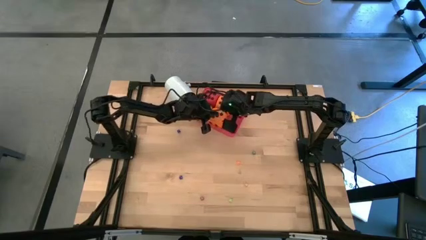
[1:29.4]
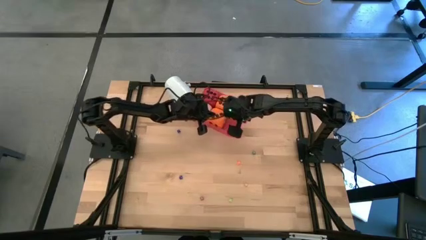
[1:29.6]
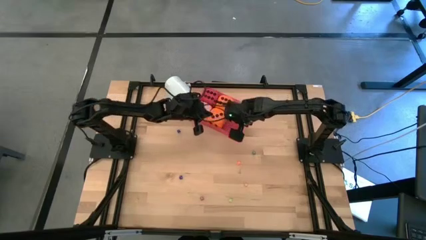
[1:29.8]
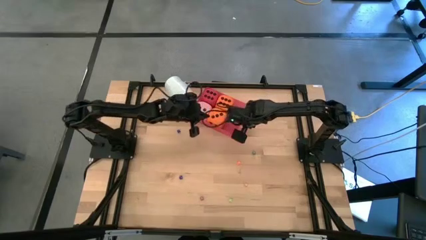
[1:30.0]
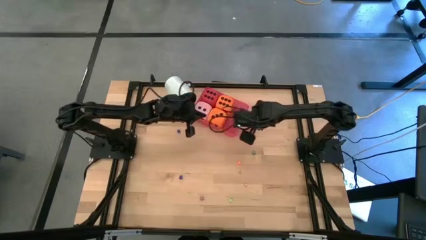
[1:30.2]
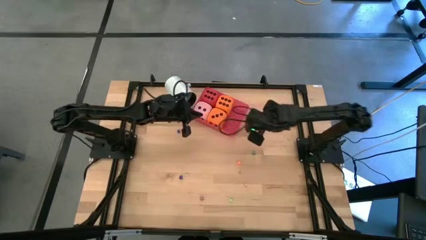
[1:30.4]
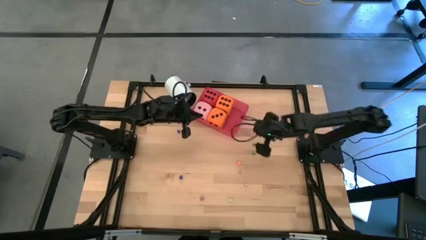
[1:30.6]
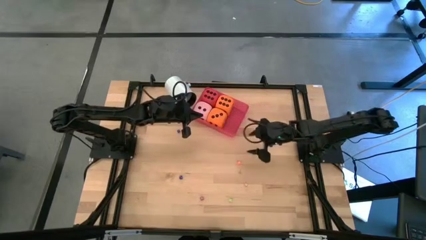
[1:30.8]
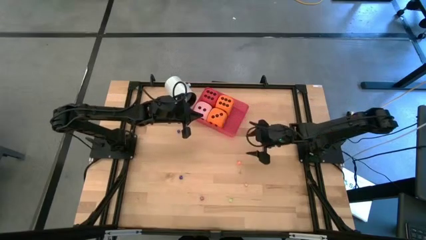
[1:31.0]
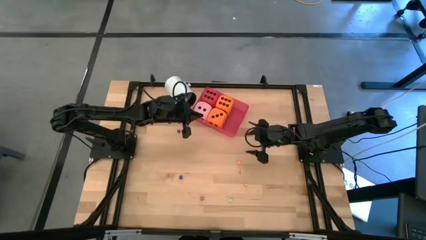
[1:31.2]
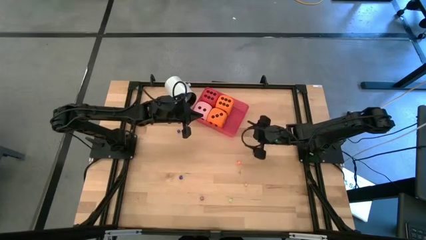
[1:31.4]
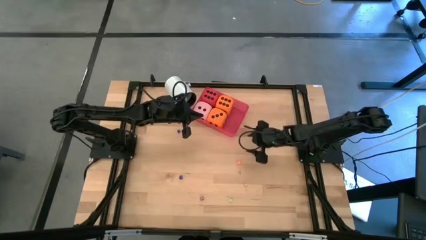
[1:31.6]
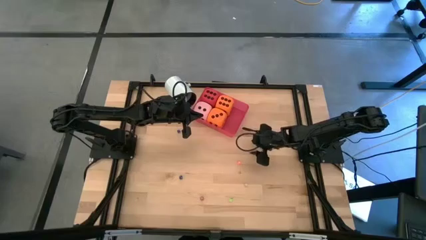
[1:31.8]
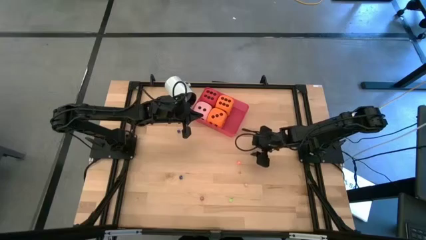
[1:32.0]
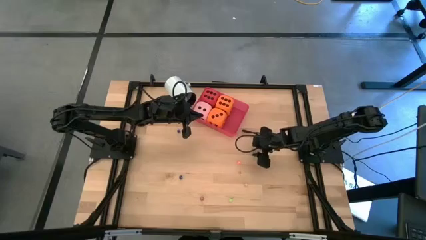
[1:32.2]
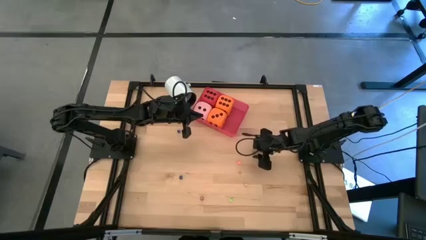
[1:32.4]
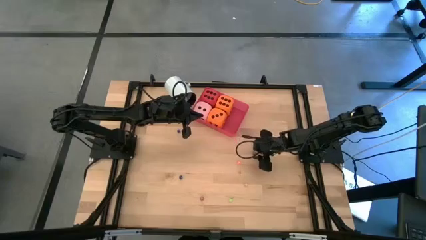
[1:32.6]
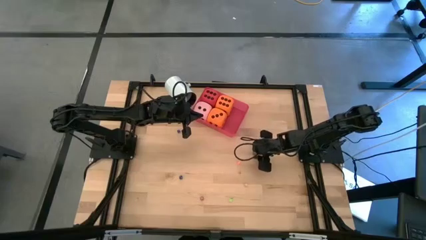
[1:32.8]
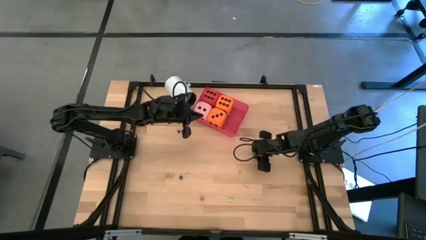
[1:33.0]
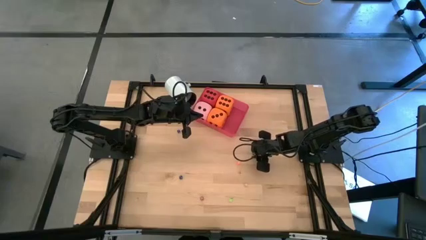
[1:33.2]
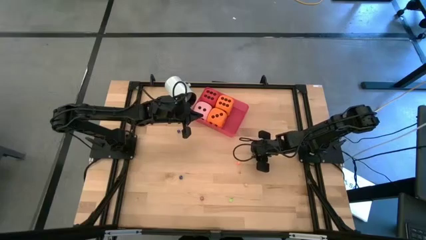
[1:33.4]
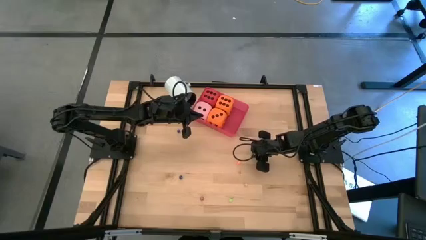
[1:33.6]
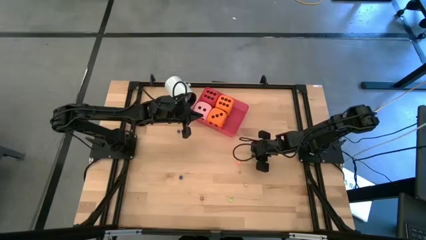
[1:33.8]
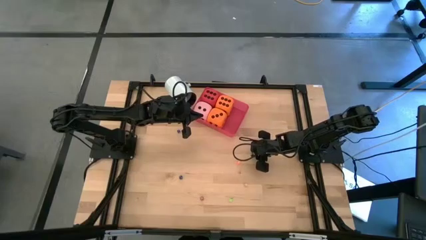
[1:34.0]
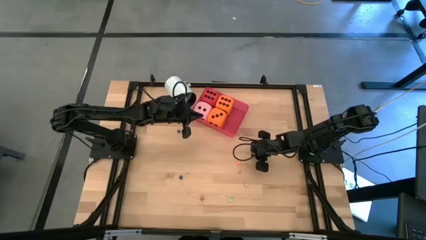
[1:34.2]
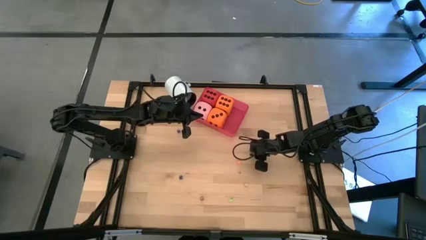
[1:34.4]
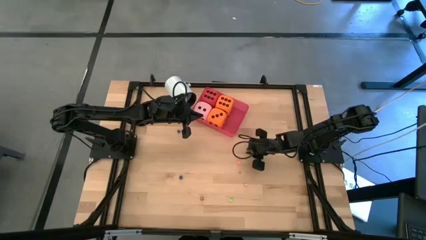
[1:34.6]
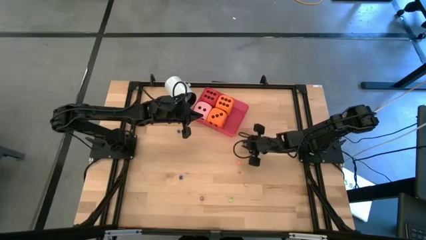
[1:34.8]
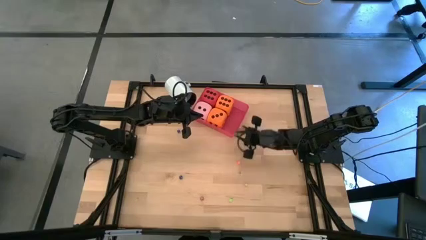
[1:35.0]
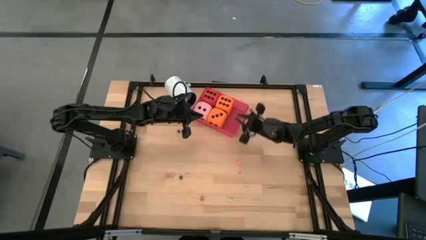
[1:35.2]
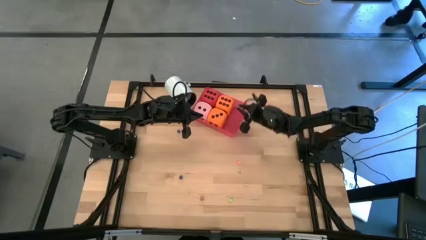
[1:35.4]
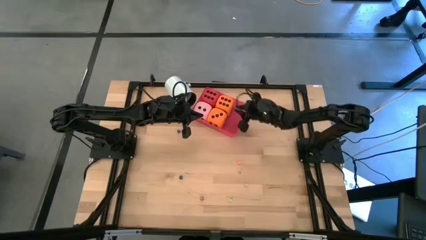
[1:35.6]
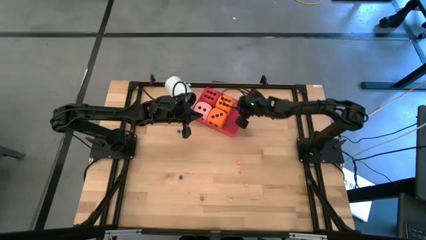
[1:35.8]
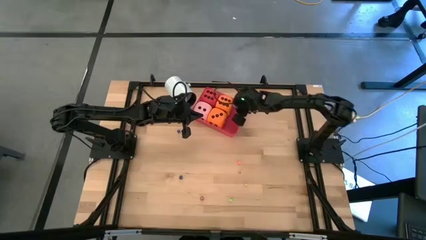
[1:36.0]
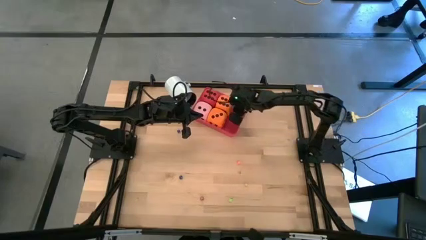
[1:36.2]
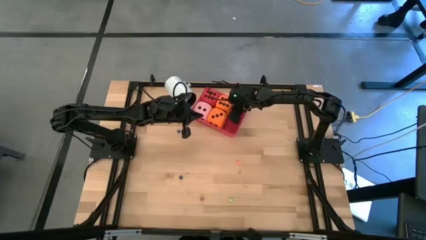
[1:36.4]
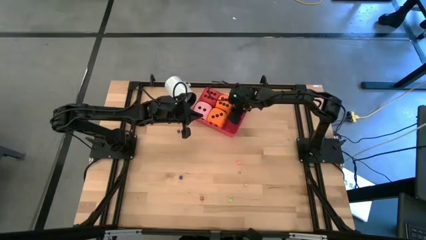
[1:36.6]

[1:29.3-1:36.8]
Task: Pick & Place Dice
Put the small green die into the red bin

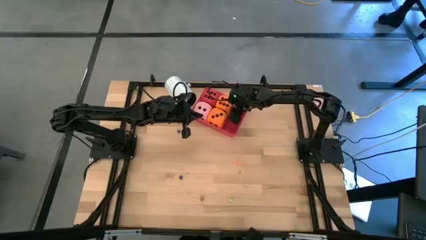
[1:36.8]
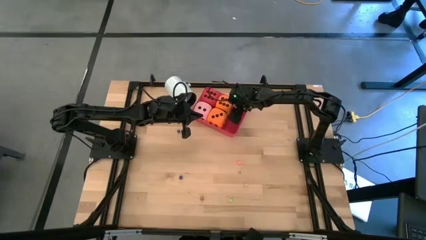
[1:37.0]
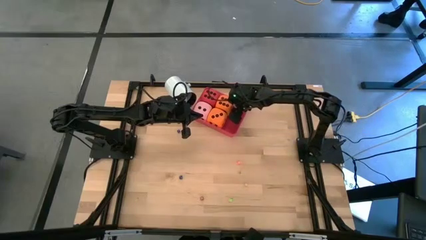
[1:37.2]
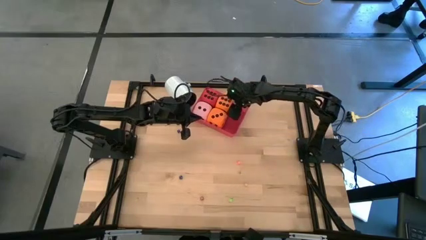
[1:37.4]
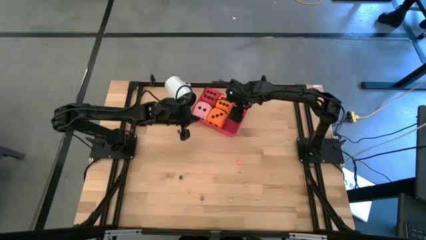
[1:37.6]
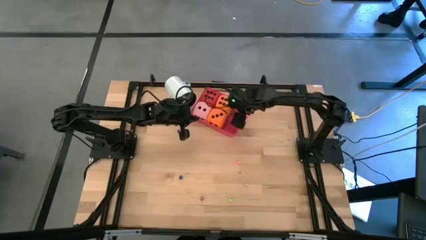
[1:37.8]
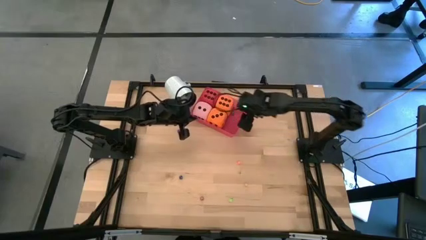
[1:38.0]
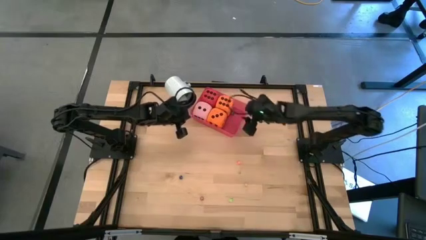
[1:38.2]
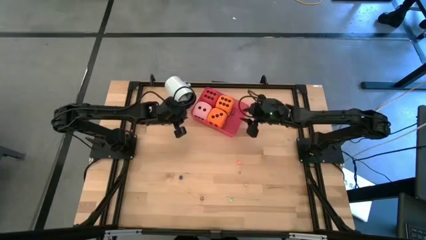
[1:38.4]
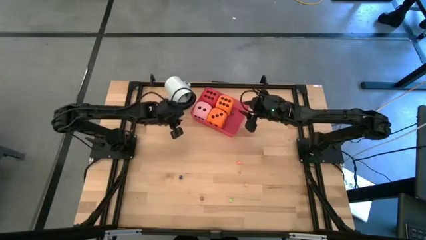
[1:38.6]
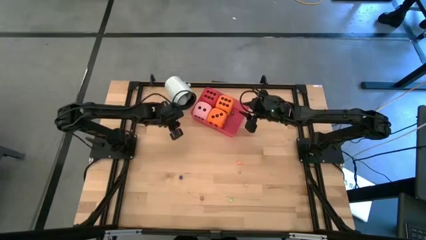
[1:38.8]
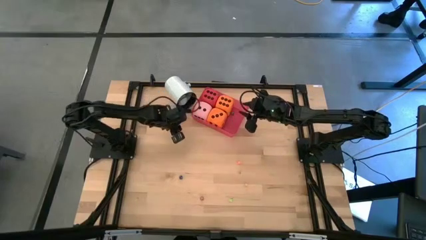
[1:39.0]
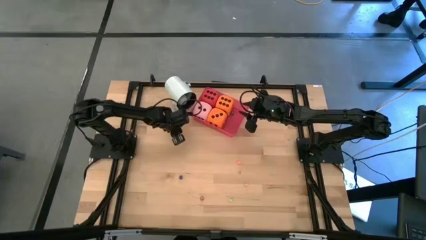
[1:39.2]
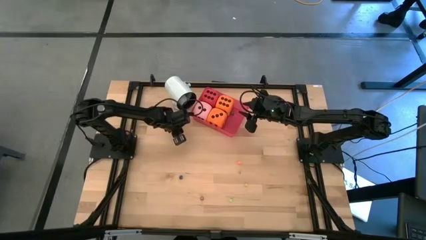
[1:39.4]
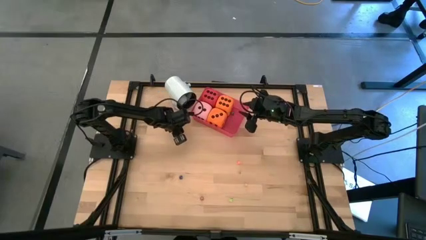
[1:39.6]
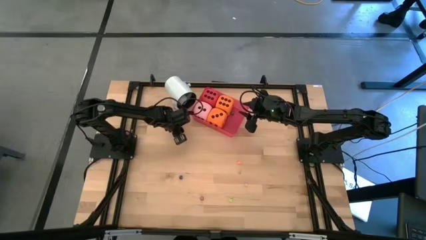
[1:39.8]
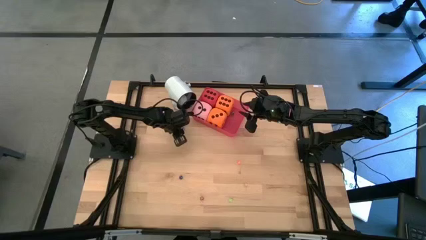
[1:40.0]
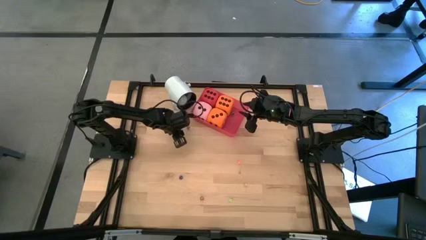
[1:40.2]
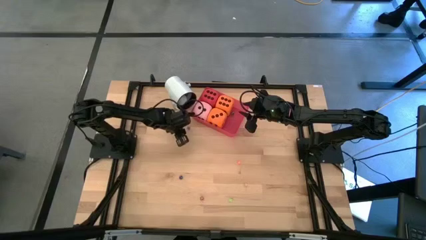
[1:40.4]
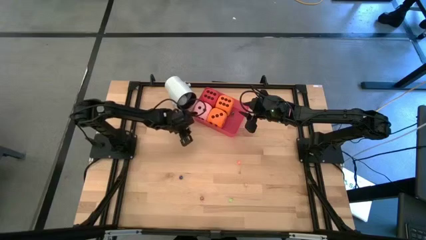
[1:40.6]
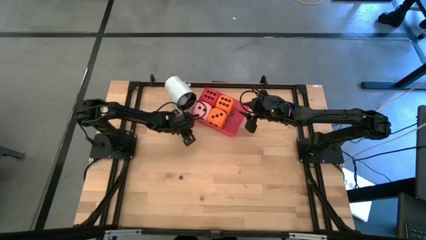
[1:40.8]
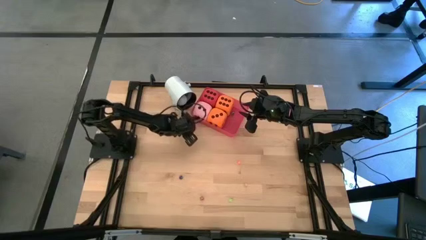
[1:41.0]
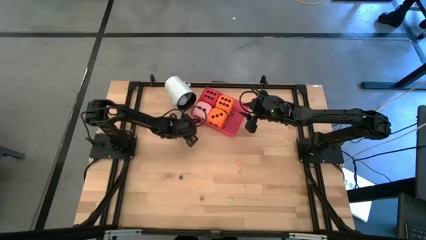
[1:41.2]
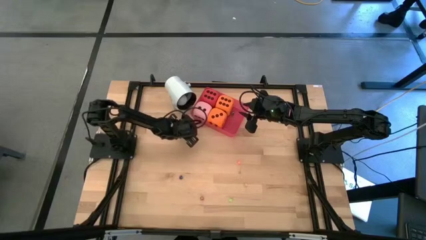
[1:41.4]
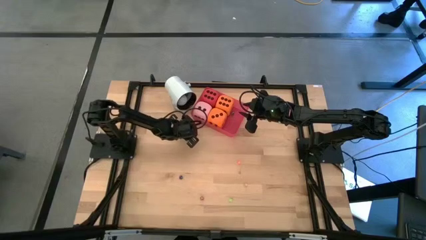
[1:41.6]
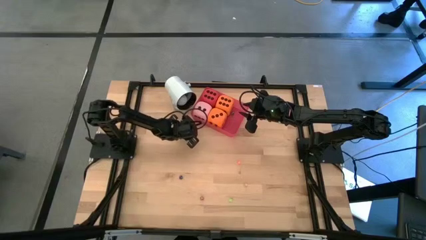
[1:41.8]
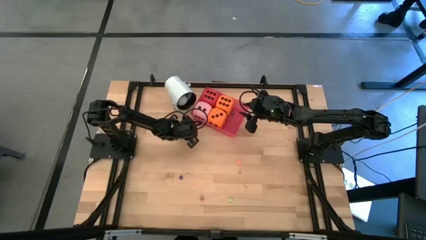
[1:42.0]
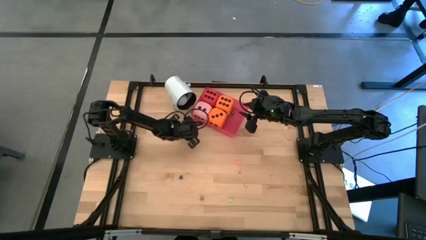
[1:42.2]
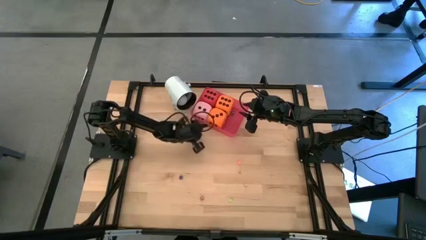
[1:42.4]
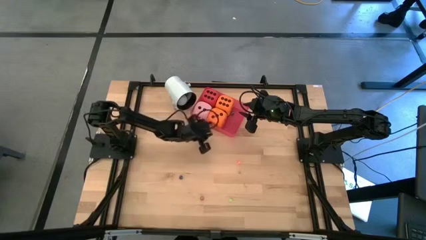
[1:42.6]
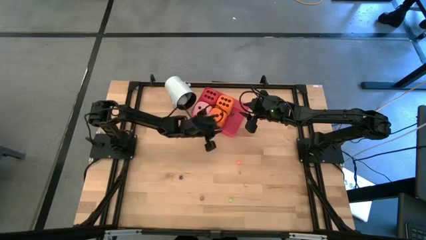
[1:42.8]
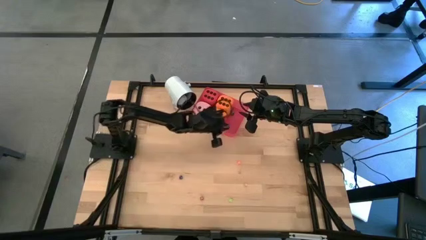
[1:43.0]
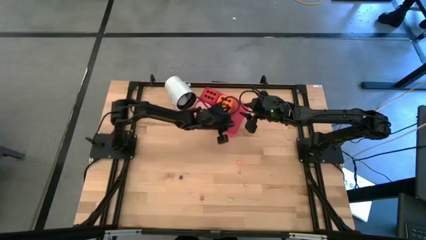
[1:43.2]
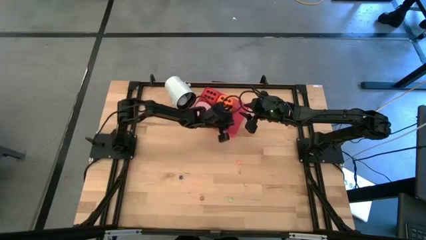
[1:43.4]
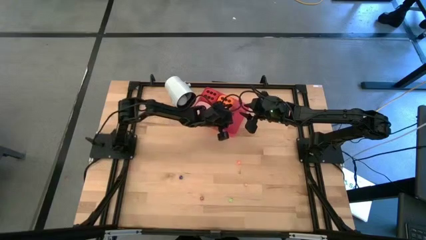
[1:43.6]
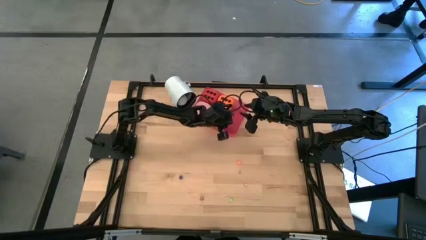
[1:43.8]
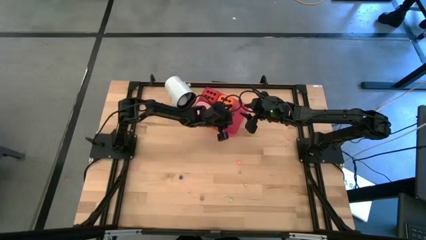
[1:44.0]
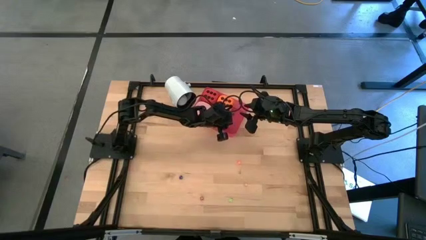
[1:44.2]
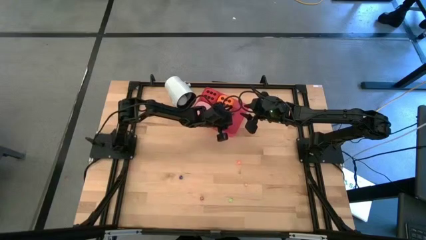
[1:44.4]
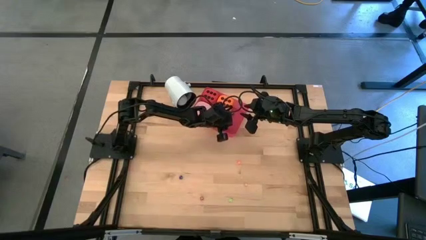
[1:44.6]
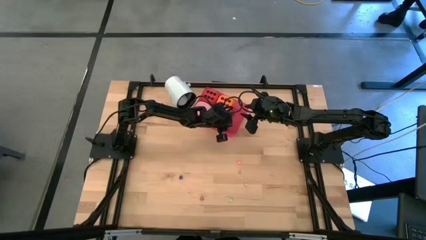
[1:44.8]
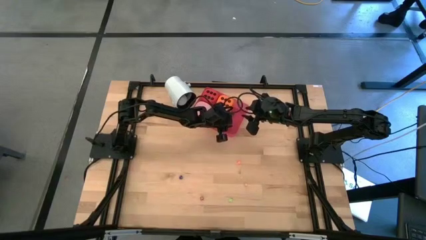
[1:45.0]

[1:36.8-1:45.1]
Put the top small blue die into the red bin

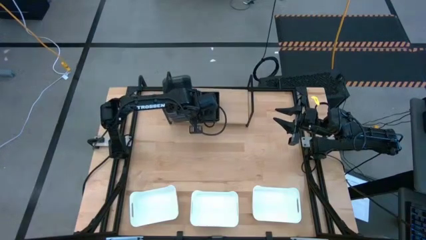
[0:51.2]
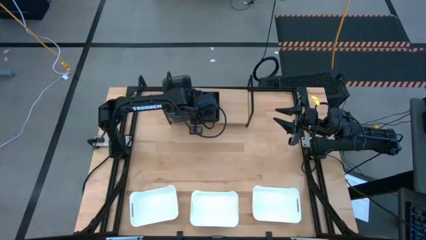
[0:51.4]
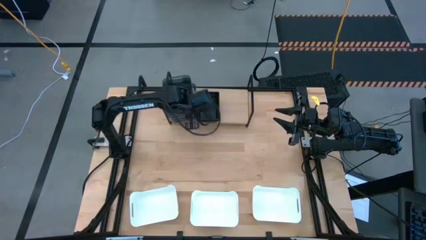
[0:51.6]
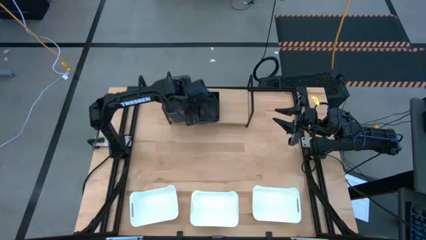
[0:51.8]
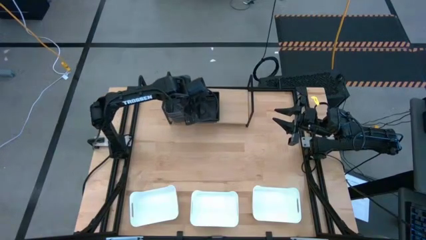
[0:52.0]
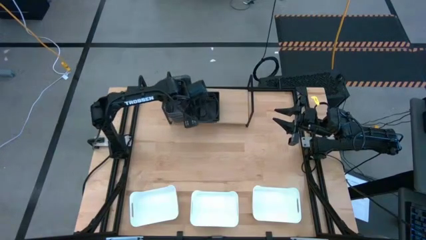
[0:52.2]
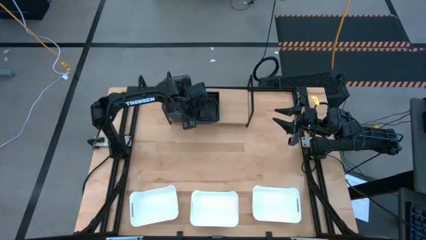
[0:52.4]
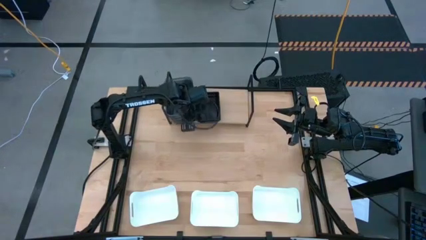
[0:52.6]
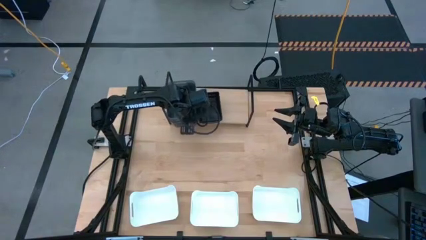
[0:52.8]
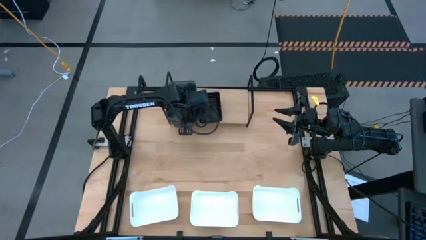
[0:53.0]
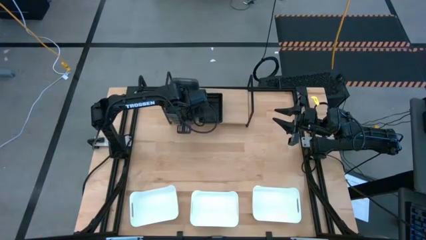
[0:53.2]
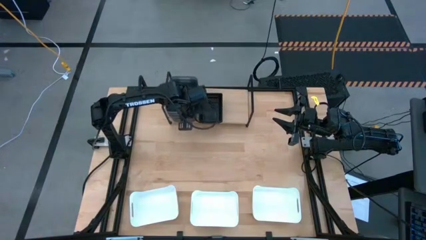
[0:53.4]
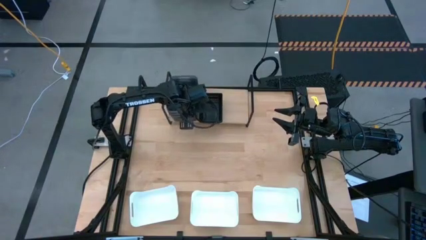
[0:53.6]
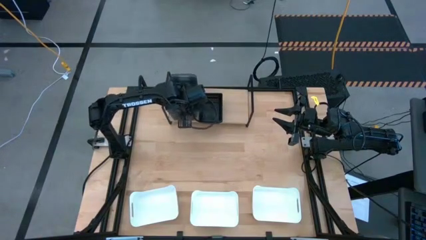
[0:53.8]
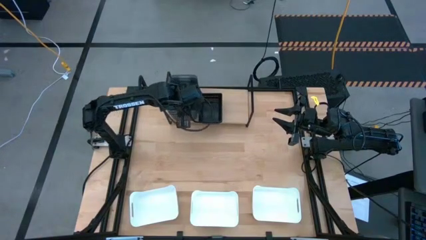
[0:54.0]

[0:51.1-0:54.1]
Task: Stack baskets on shelf by color
Adjust the stacked gray bins on the shelf
